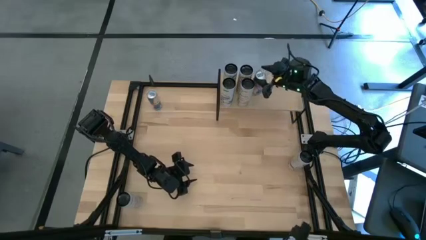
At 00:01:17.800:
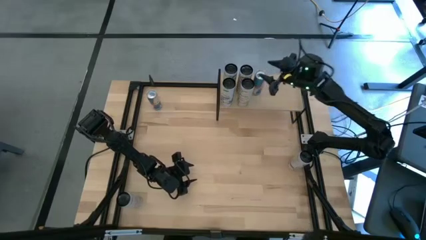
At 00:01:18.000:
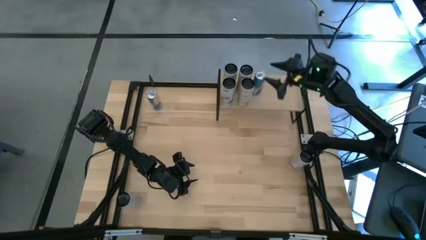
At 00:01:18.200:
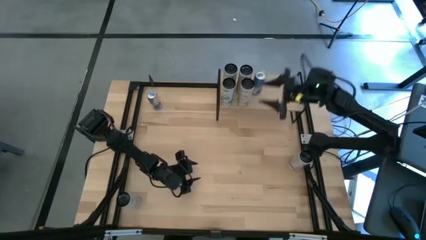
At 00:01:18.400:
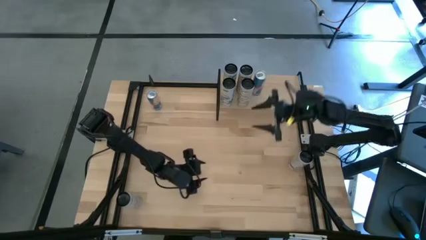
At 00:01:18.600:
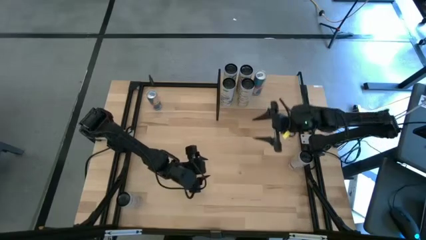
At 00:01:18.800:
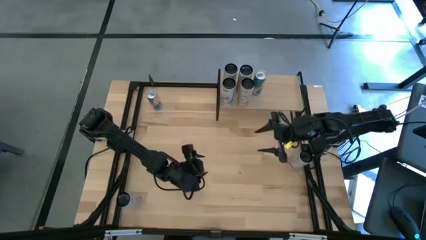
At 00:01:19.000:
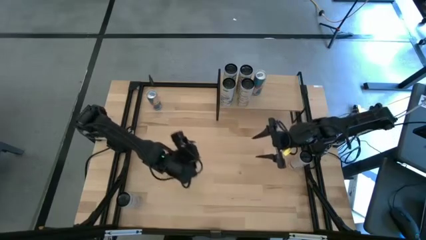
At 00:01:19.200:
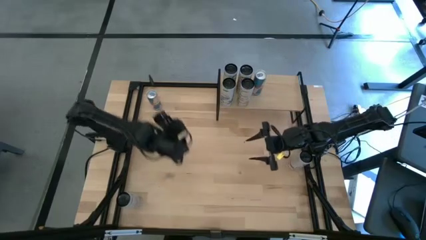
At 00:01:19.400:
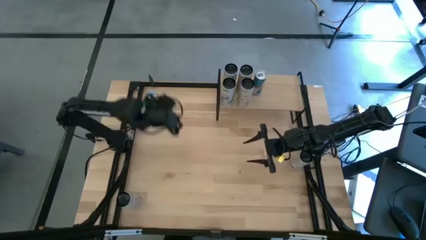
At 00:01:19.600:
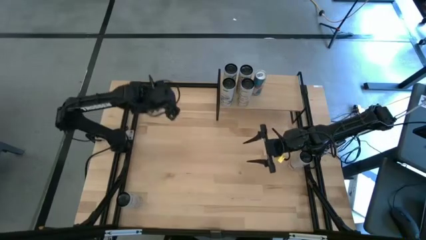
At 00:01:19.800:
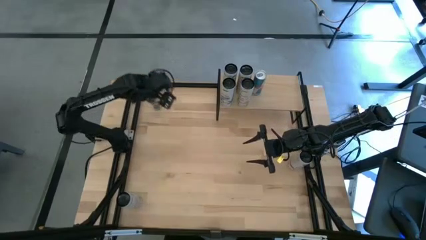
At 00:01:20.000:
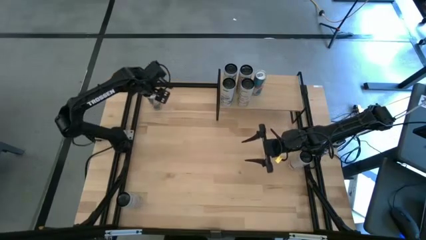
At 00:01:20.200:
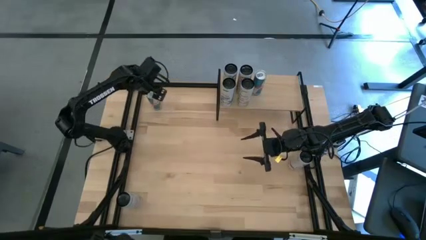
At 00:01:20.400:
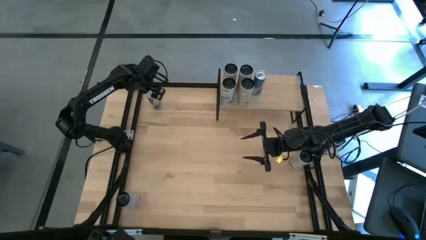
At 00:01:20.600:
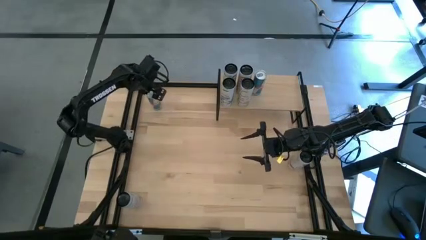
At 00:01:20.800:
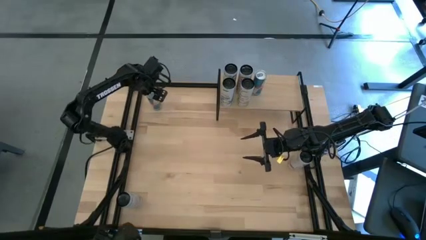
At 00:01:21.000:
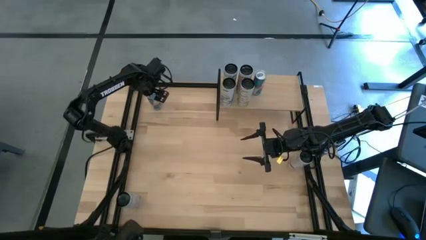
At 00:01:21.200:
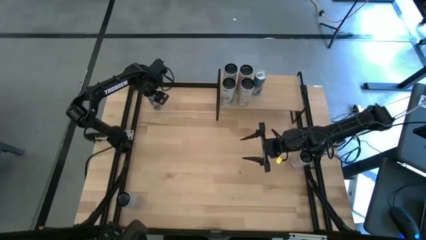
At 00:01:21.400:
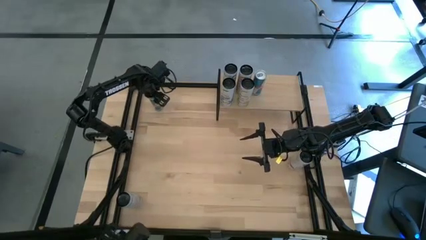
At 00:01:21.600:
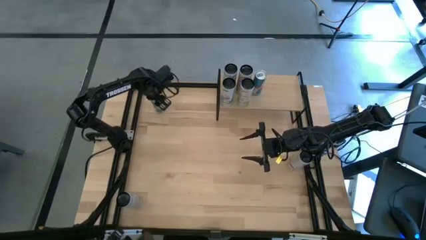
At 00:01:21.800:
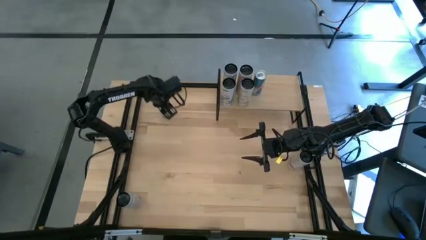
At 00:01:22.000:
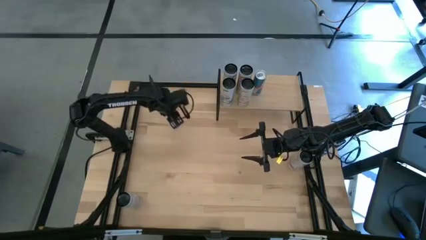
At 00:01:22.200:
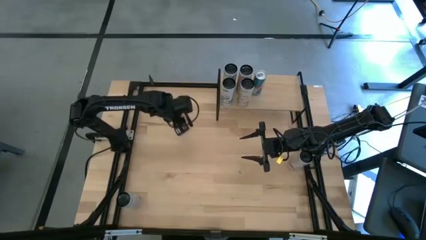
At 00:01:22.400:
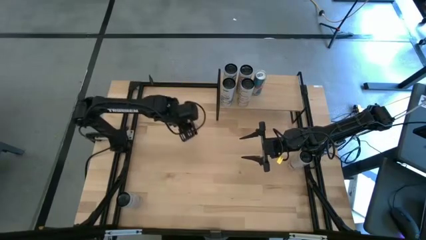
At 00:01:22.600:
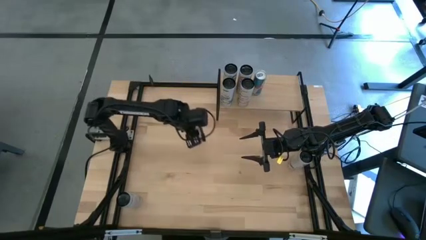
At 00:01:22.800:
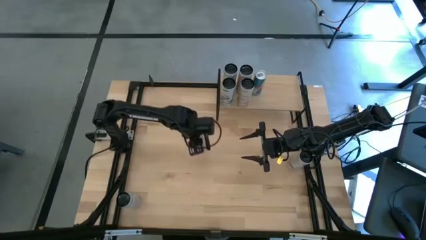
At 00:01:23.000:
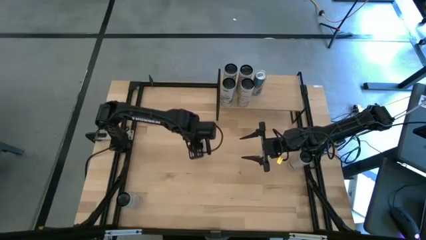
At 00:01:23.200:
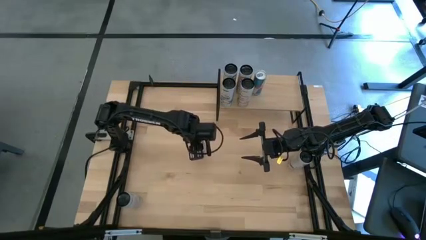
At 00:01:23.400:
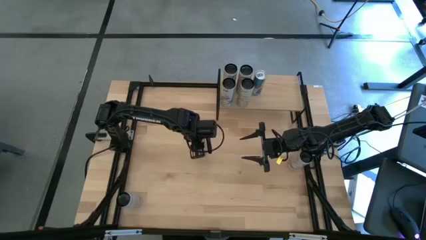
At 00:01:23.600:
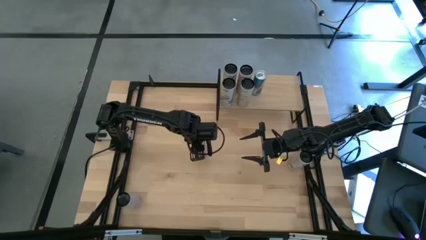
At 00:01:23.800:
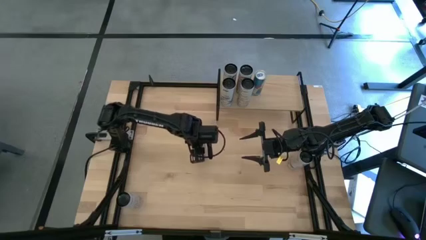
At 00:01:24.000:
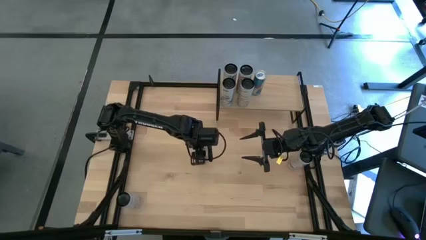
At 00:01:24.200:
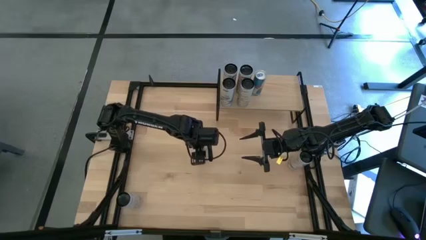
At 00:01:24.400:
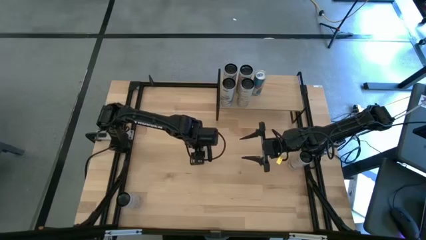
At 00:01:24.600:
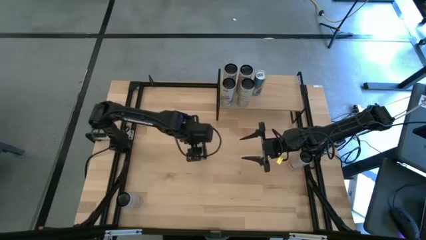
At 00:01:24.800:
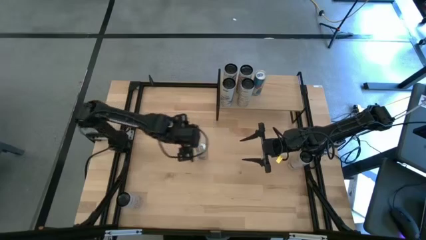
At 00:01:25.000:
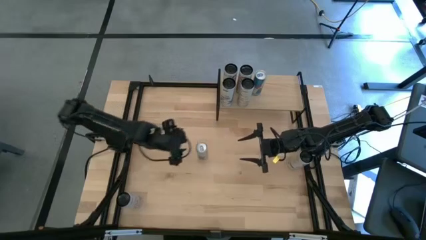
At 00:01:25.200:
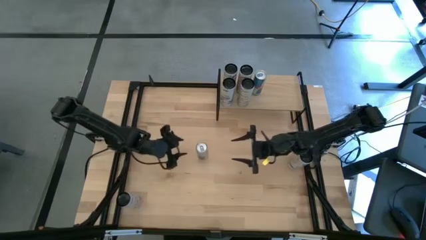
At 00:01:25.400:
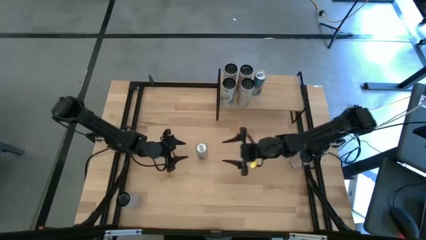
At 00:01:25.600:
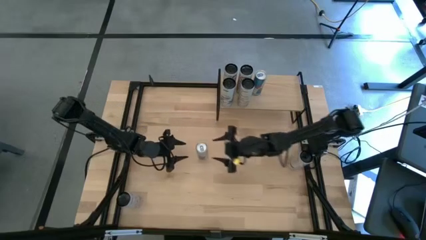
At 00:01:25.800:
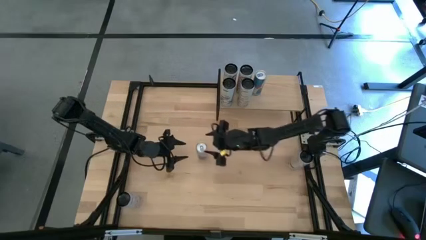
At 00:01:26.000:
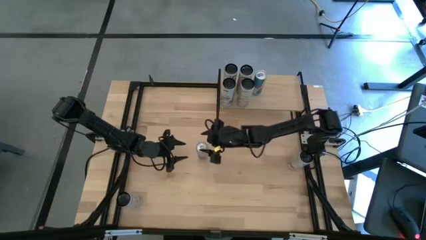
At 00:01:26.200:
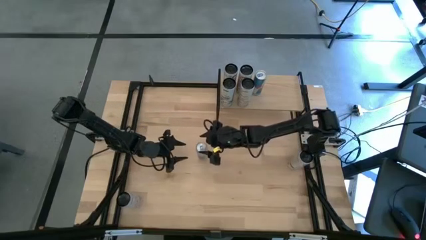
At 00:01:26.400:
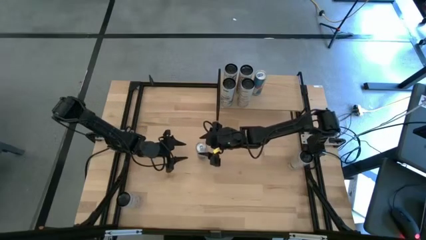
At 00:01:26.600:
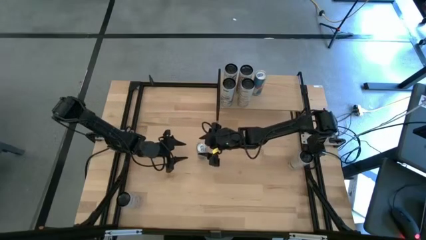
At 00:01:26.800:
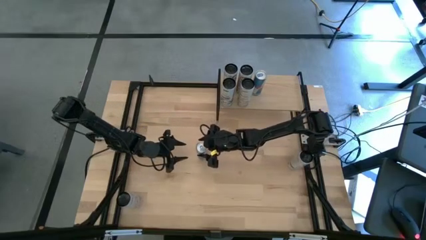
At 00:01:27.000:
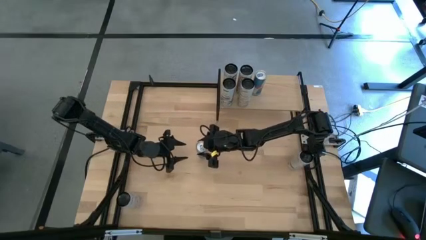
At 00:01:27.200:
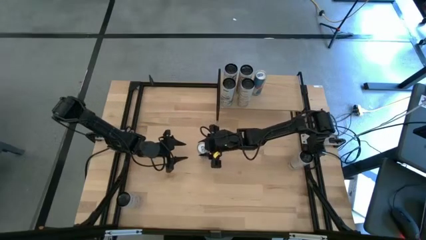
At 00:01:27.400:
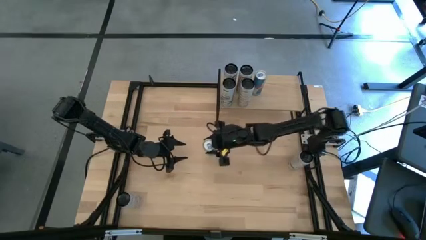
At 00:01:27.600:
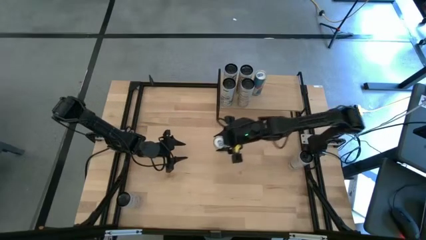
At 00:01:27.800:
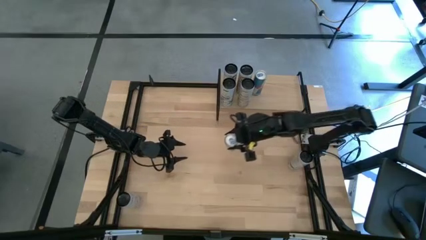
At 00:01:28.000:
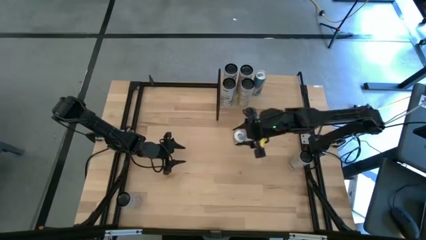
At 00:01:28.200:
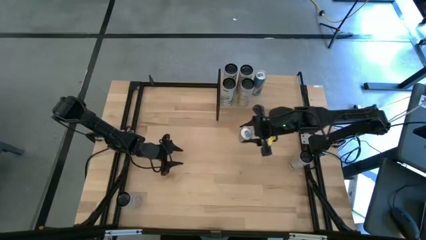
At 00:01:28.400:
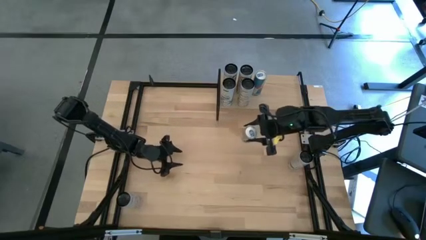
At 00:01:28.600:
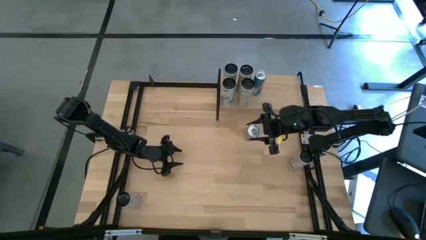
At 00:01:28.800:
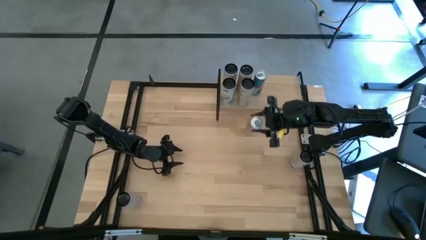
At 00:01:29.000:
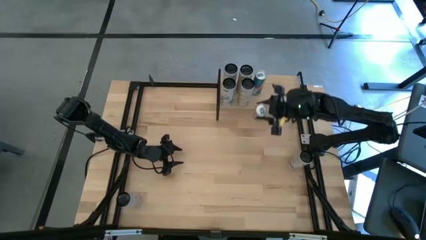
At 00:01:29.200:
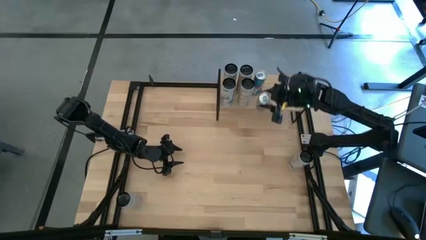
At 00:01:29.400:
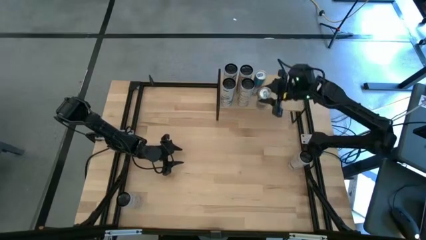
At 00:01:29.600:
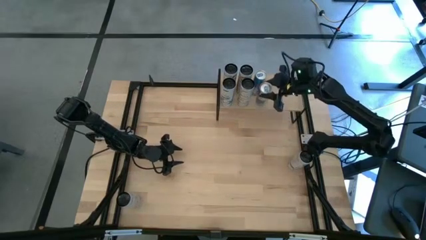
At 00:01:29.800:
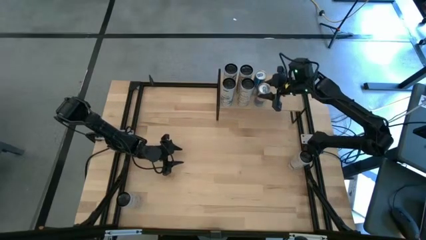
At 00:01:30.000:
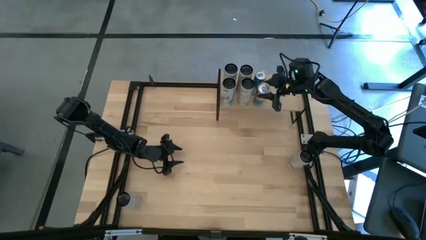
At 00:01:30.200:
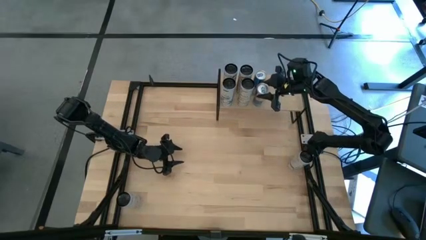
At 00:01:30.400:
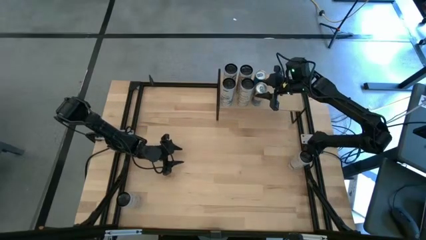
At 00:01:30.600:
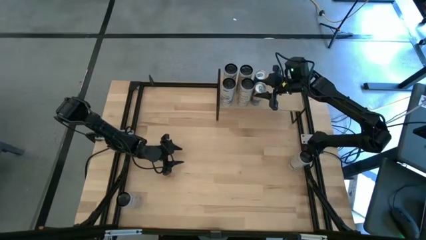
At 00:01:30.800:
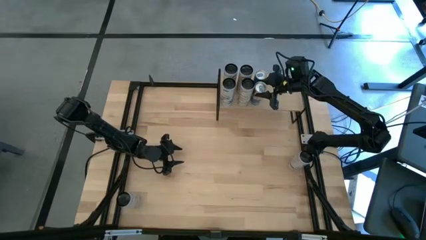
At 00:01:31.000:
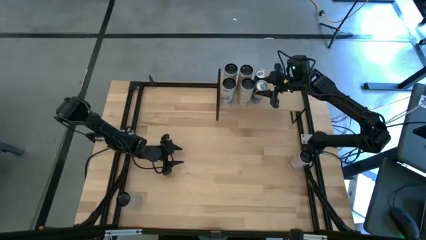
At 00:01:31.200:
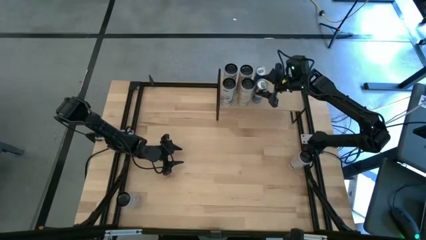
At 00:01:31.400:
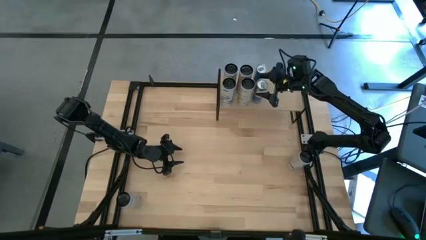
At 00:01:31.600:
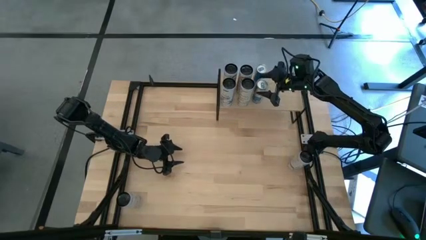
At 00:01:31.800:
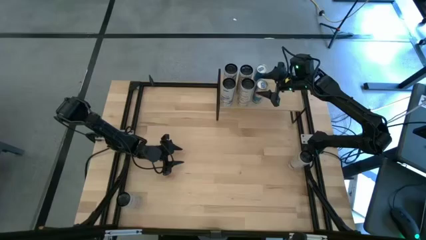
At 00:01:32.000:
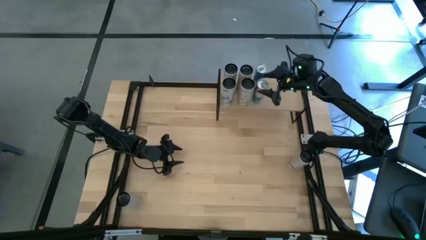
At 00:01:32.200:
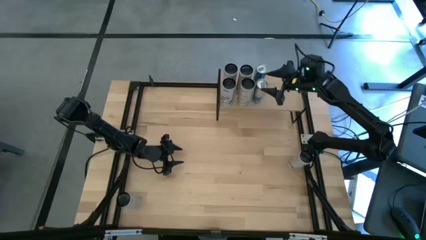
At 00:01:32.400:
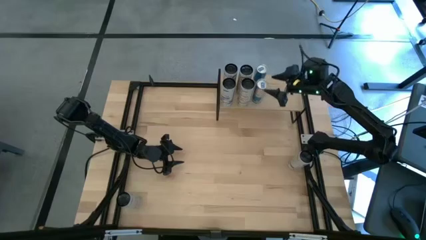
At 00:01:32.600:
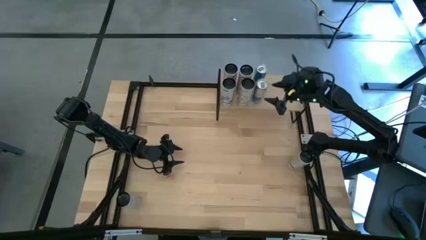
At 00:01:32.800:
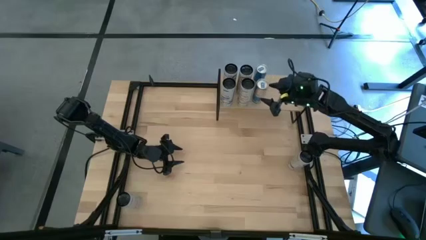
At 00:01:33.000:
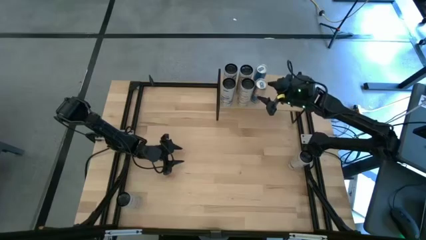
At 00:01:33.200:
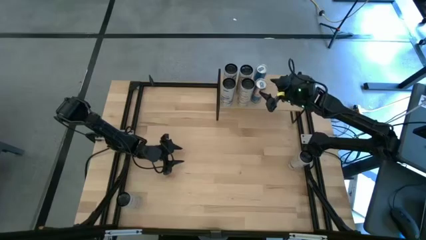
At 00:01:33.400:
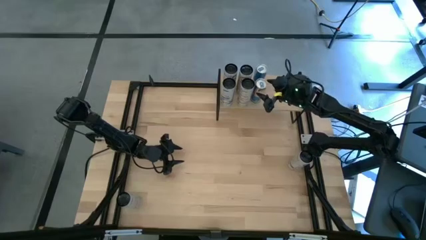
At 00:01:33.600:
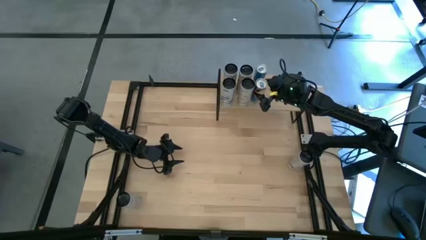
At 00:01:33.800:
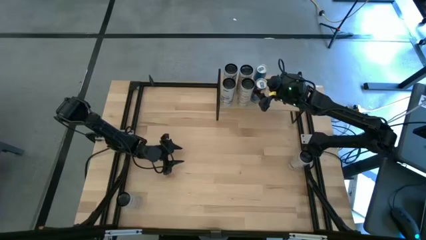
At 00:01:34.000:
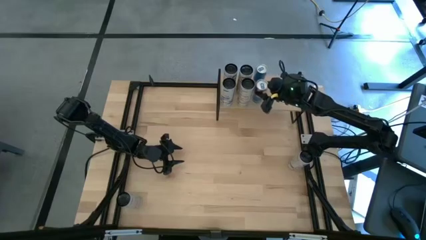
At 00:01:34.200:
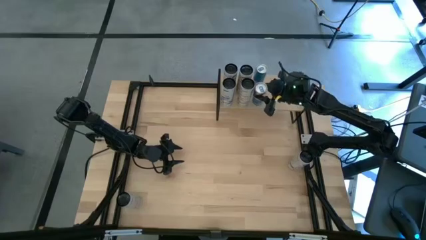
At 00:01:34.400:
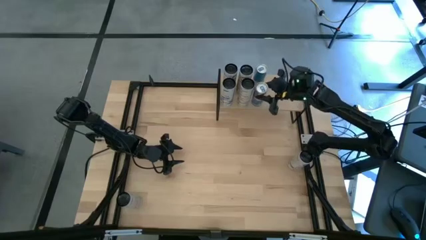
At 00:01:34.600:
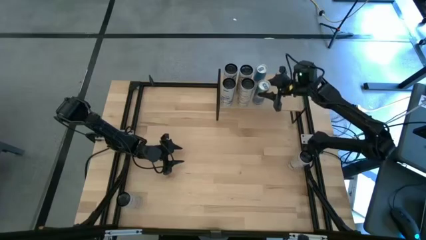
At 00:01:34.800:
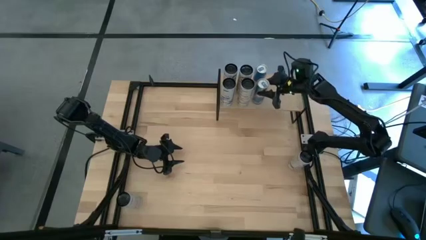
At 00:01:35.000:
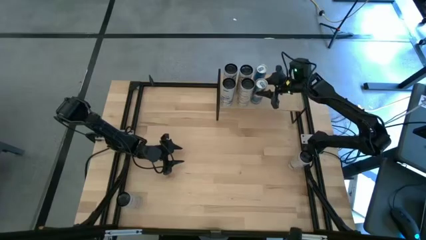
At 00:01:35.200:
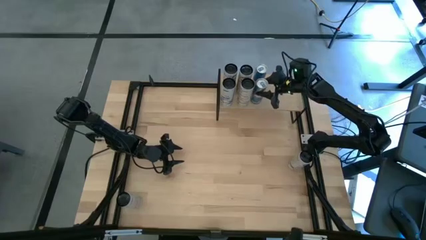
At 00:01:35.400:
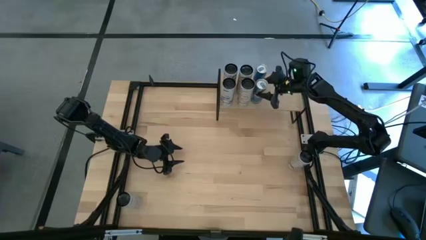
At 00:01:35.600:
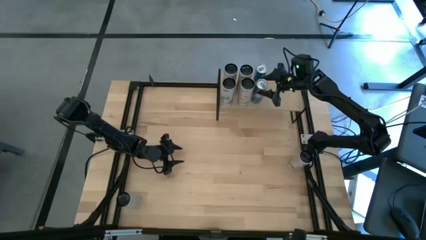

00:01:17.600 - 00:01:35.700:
Task: Place canned beverage on shelf
Put the blue soda can aligned with the other blue soda can on the shelf
